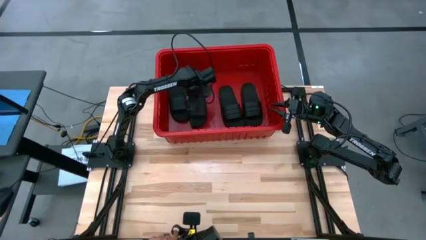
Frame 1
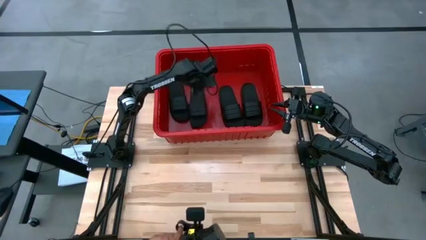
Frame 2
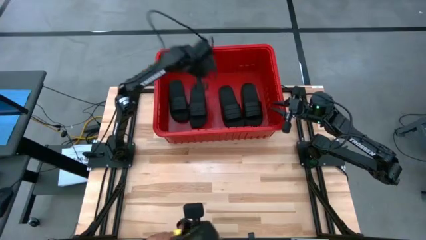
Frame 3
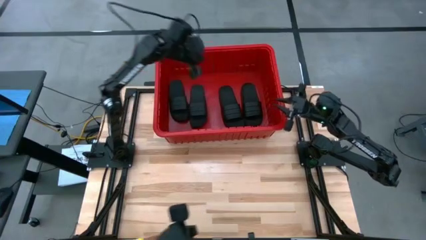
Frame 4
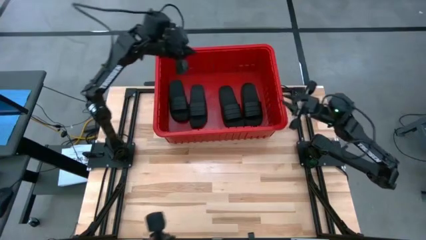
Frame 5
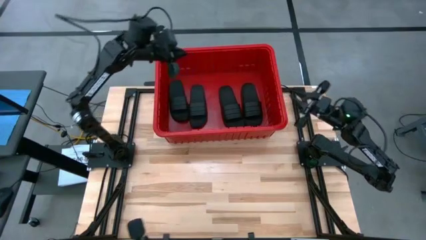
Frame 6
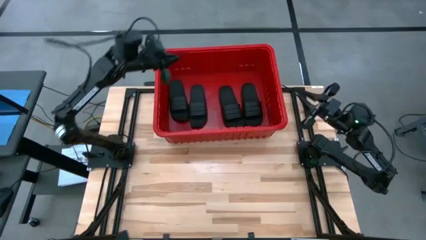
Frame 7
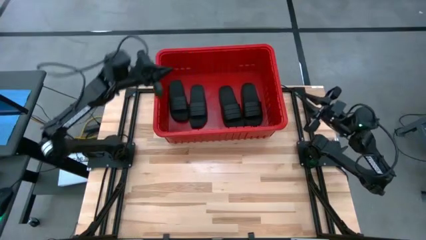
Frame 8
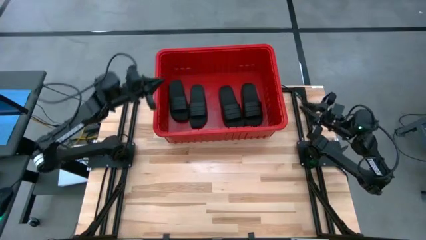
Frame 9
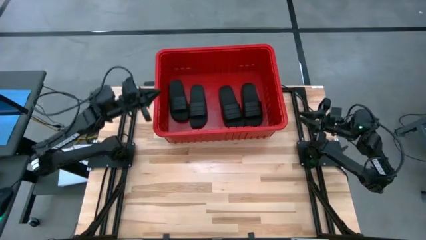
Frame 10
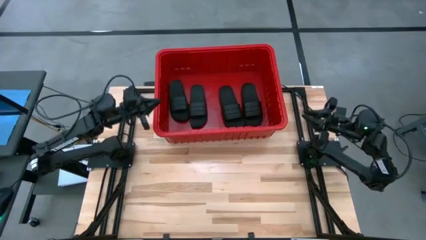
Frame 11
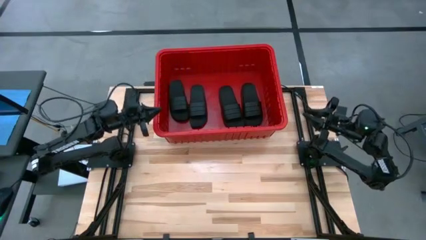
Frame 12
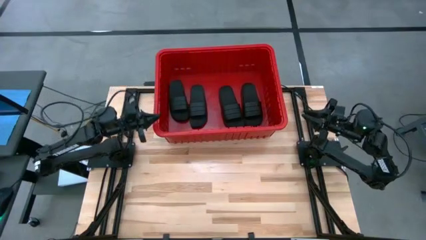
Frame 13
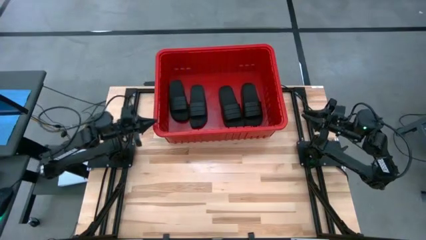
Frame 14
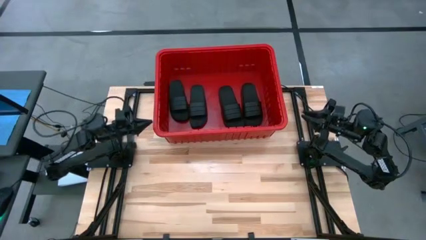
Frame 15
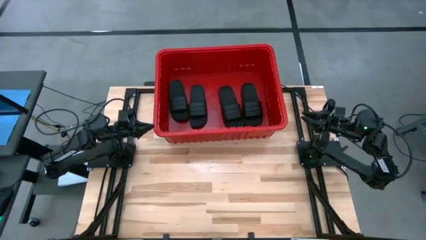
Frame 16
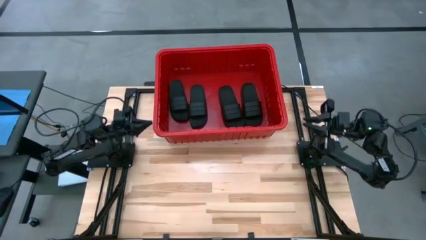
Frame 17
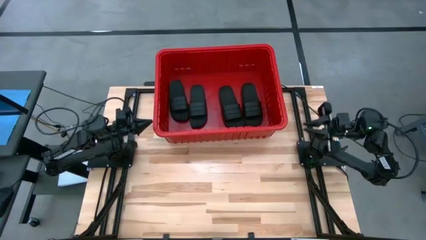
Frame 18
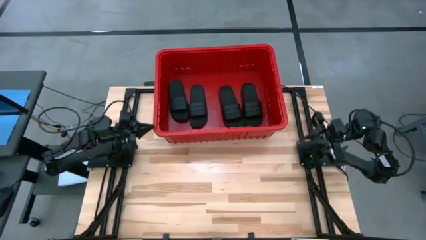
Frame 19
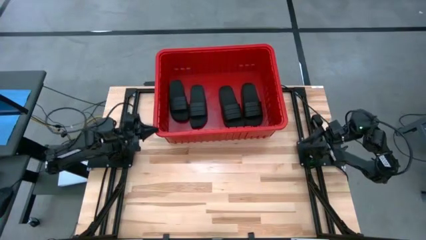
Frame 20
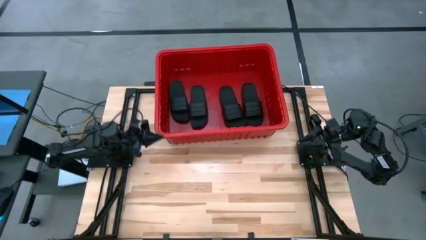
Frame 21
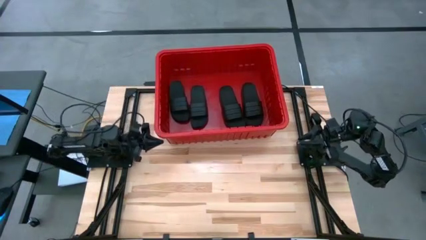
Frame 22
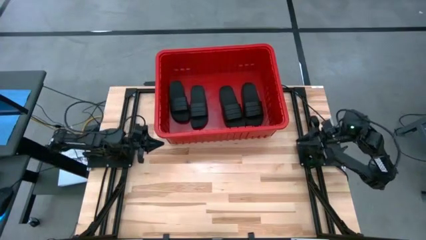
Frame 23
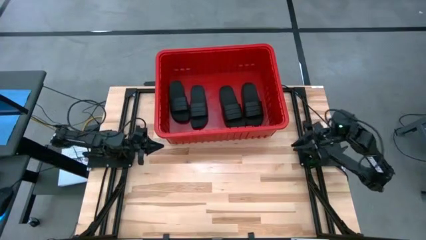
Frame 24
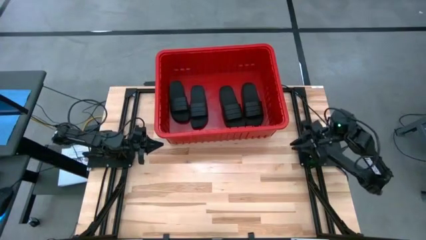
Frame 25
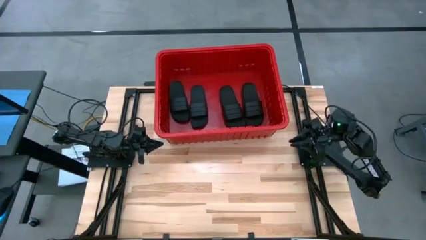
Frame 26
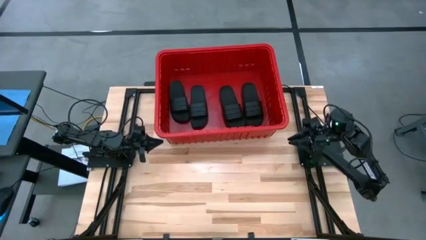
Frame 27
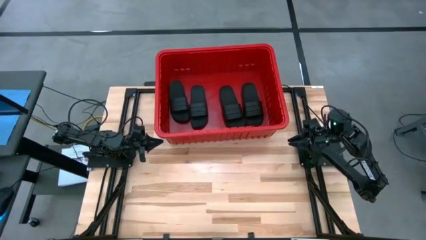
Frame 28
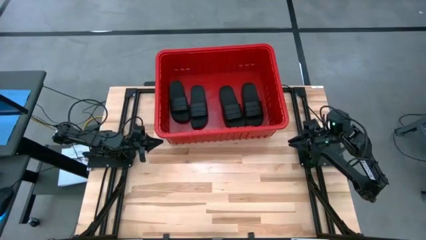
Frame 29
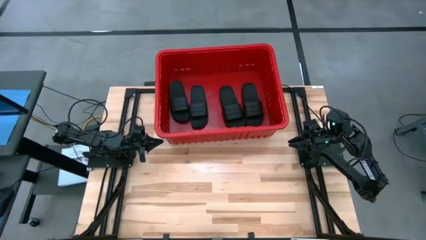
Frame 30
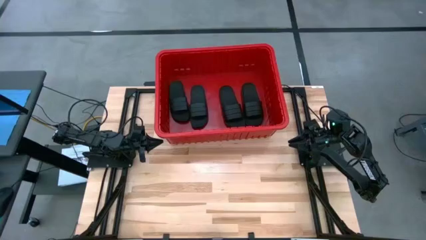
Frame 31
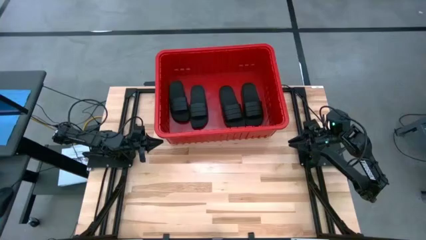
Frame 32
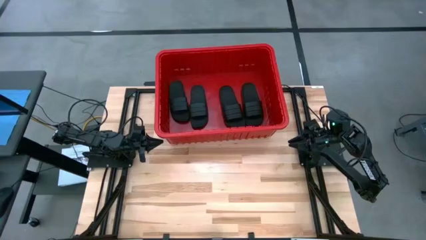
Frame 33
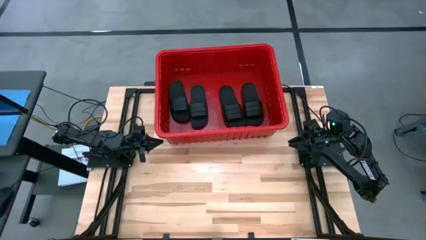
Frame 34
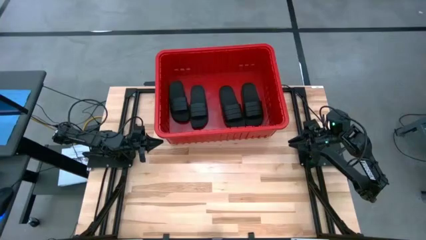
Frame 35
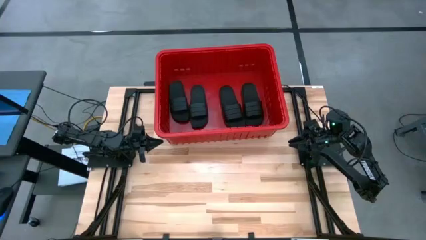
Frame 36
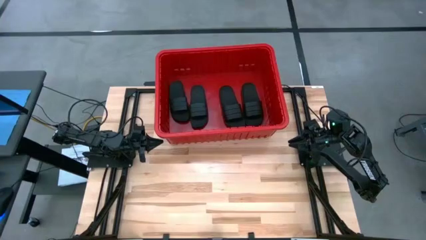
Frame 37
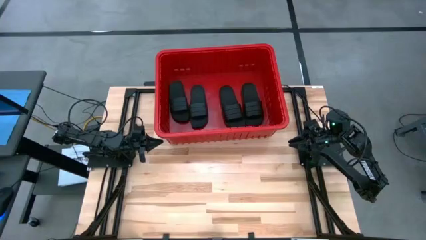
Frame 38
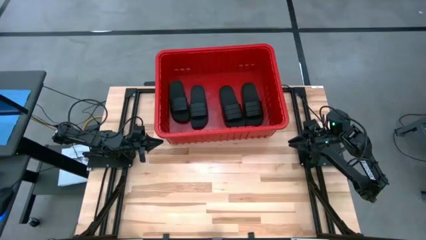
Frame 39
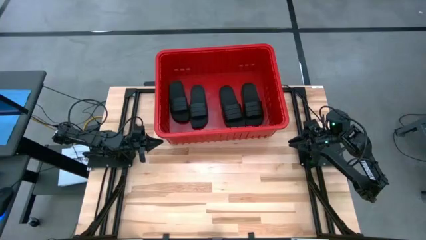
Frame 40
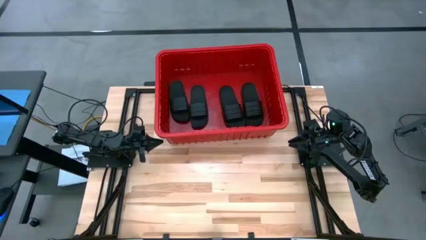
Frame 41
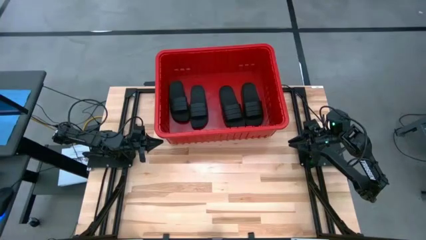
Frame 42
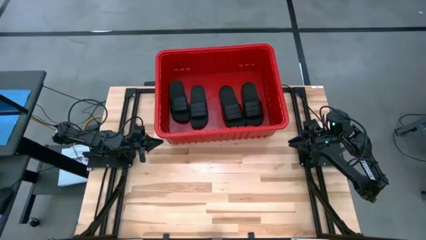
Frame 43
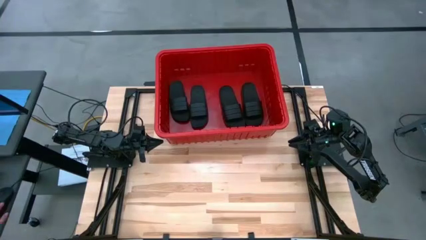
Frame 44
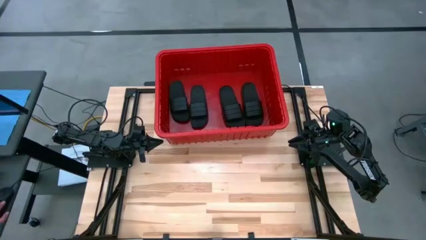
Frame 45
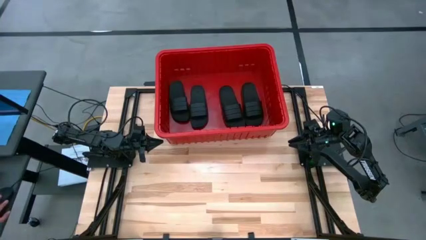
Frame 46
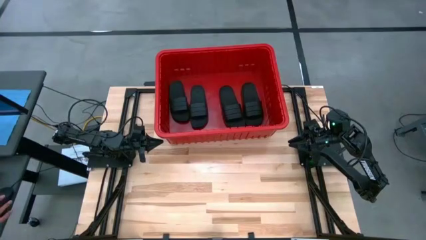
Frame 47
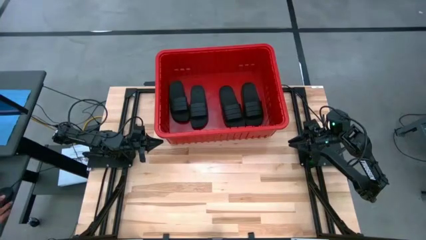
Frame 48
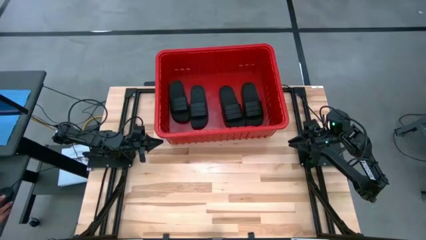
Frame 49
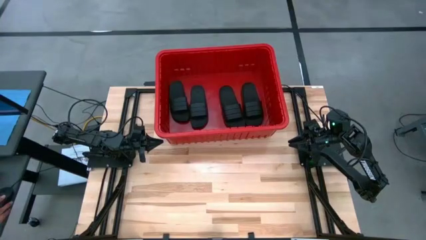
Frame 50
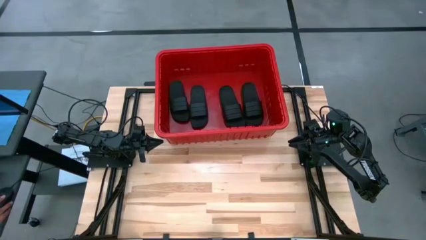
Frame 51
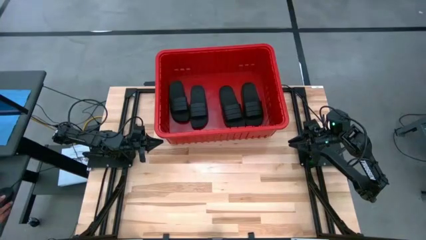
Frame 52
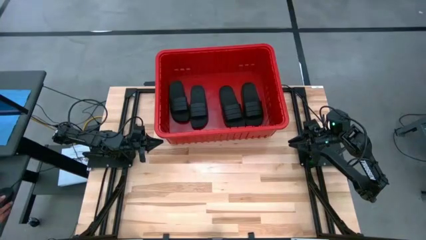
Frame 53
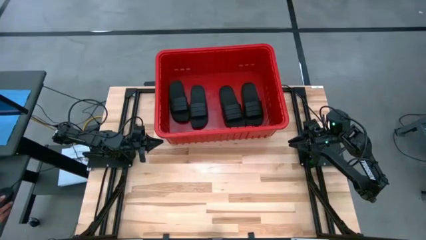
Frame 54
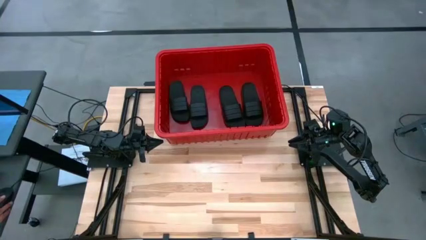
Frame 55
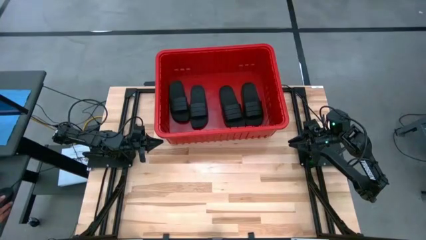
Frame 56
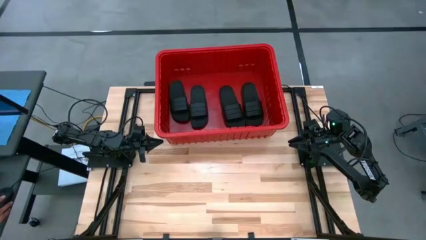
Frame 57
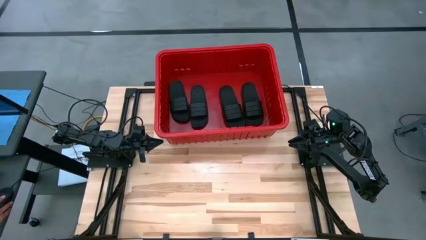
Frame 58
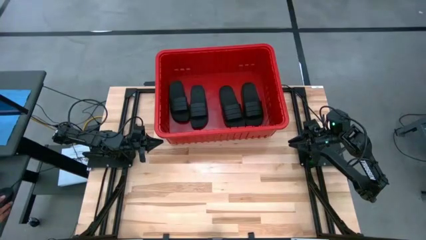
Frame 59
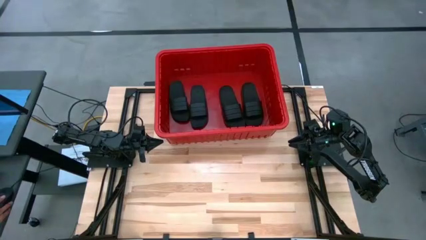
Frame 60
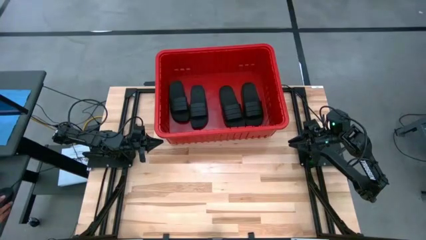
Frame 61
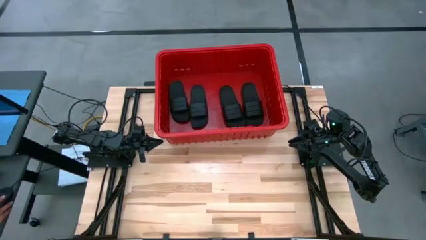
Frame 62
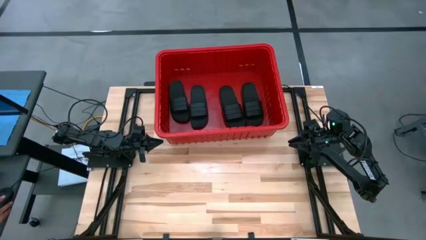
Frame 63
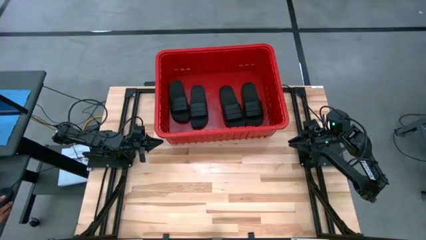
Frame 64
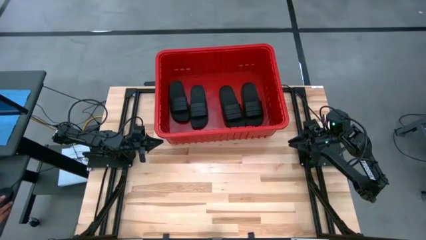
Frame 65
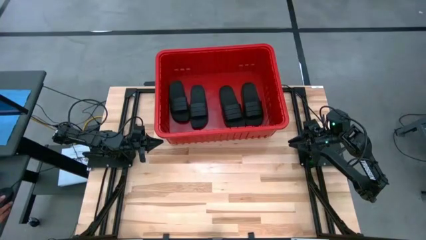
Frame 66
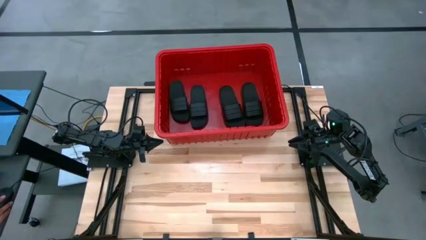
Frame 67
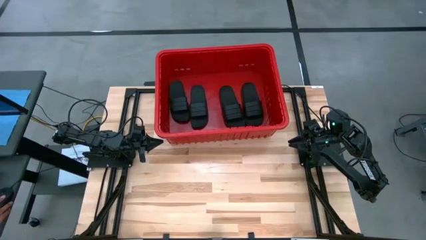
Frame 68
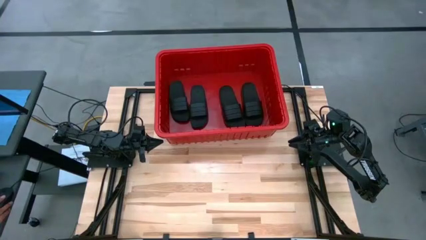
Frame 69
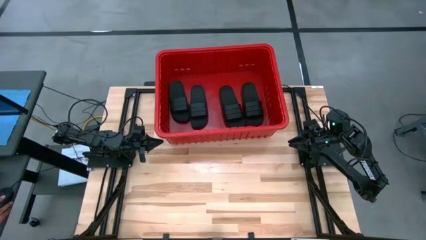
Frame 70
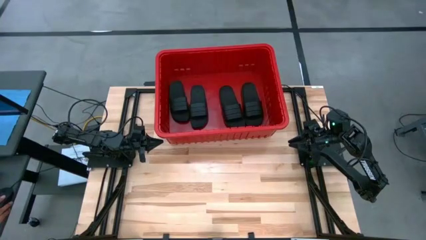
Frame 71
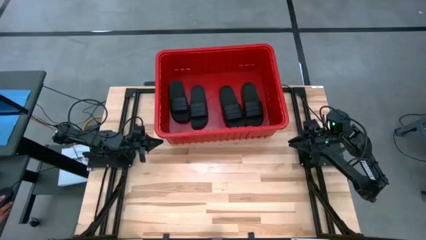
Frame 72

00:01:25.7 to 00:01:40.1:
Task: Pick and place slides into bin
Return to Home Position
